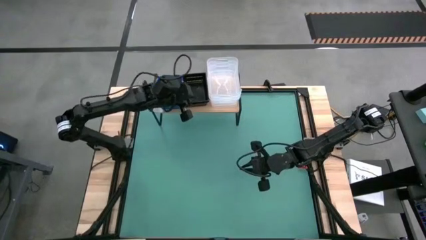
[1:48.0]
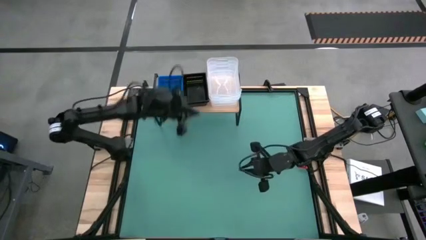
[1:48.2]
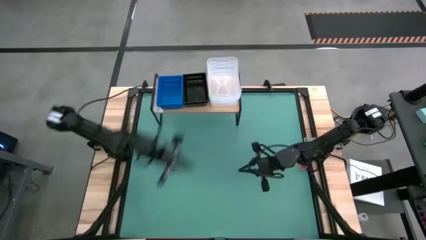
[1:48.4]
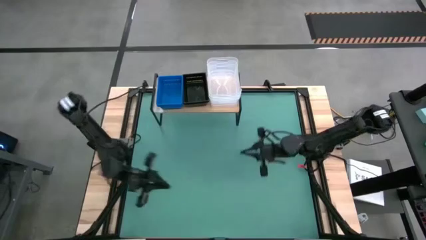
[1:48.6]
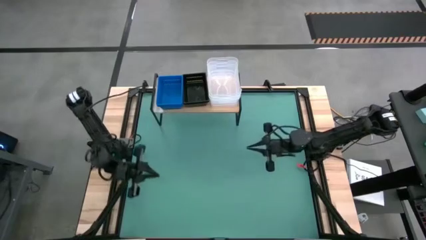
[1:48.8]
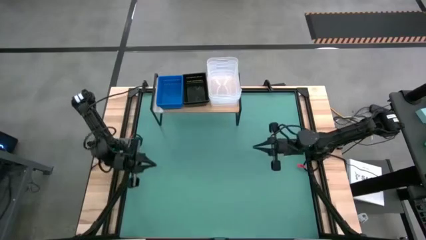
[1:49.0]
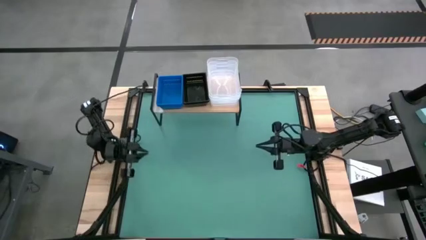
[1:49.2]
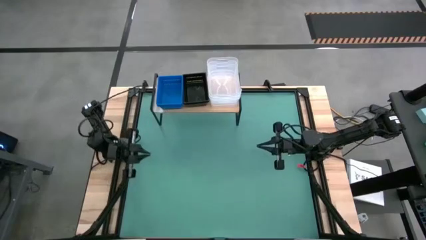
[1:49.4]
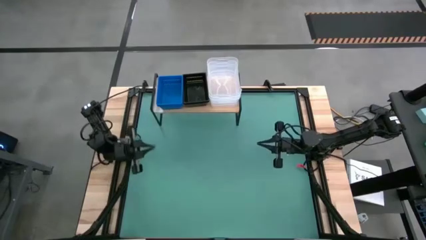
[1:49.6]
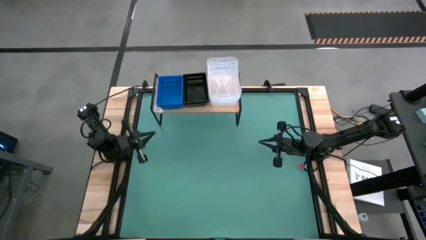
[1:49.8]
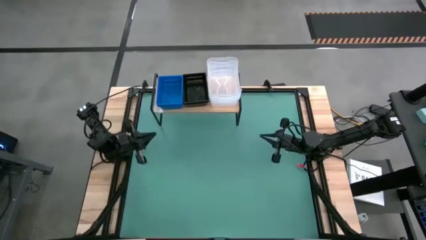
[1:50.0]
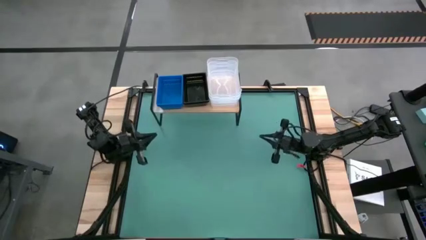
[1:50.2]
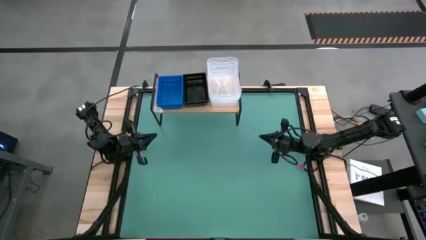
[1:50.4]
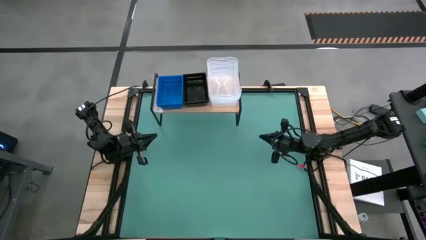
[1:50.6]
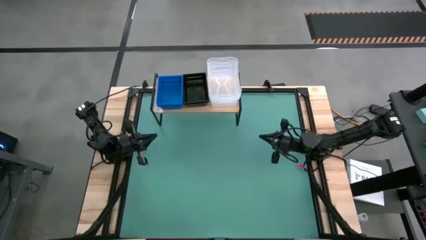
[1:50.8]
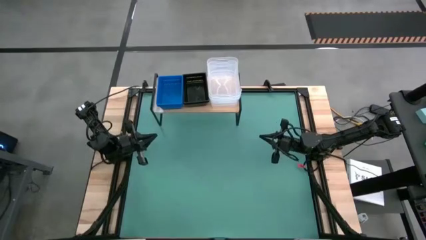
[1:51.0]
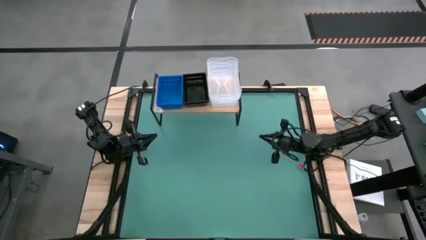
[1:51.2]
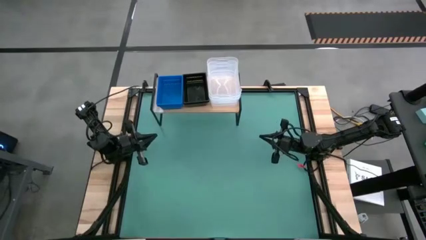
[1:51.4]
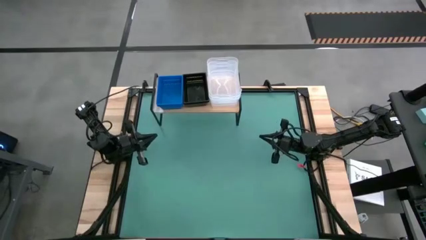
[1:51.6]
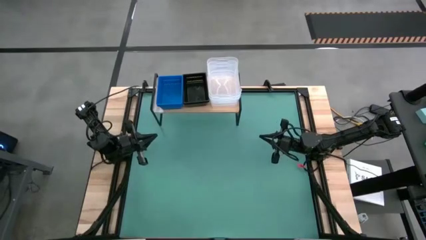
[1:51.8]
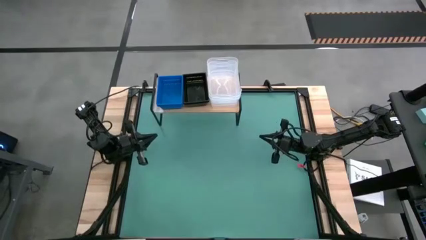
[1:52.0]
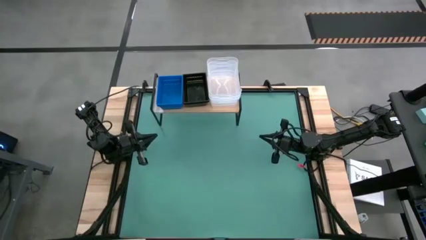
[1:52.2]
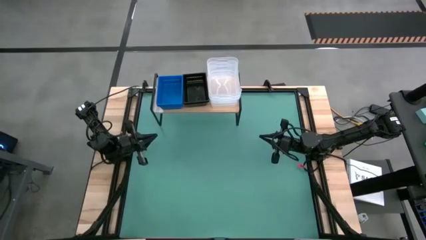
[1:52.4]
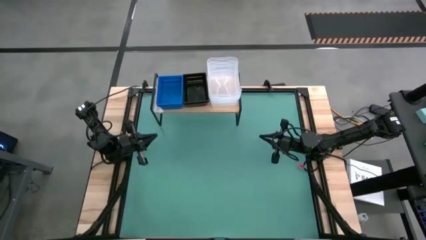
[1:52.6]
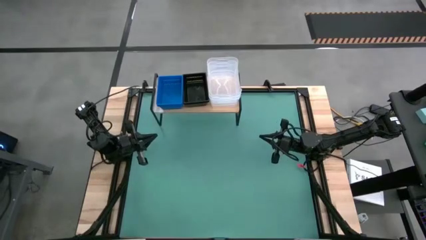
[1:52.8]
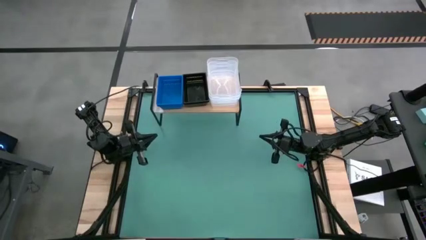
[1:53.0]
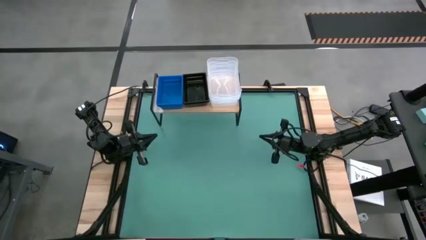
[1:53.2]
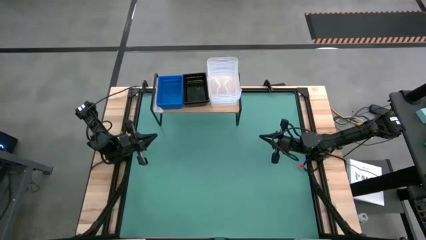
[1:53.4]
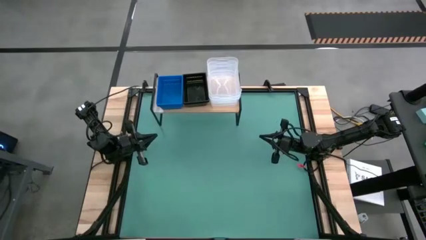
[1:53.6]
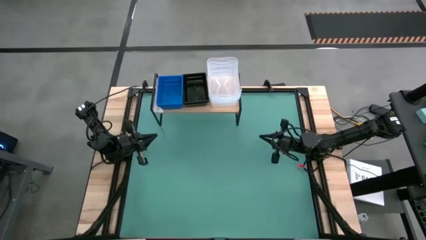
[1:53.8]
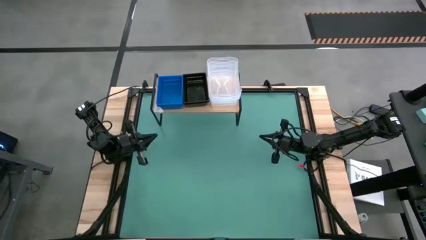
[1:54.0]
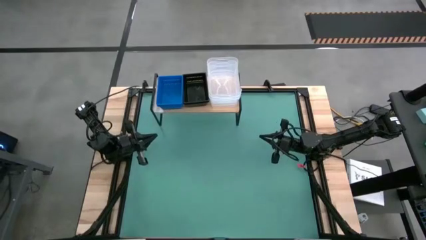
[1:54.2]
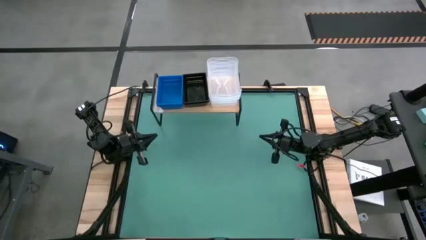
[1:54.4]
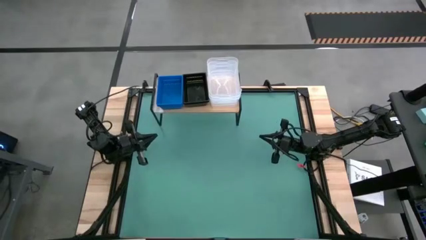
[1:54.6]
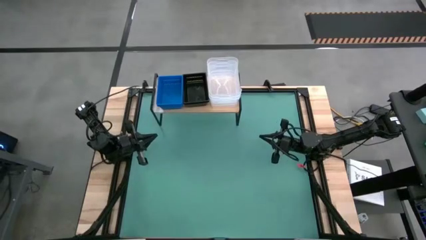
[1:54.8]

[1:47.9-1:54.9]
Task: Stack baskets on shelf by color
Return to Home Position

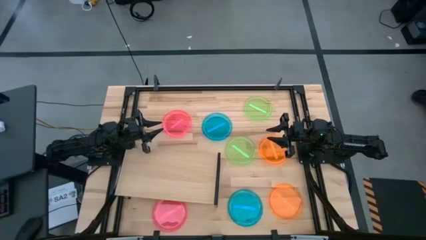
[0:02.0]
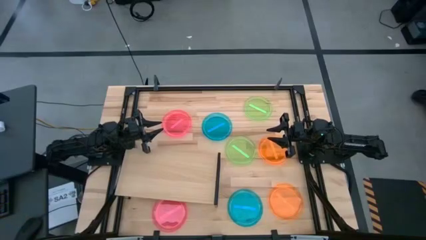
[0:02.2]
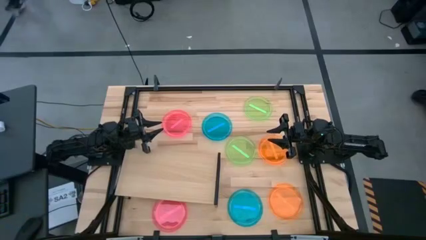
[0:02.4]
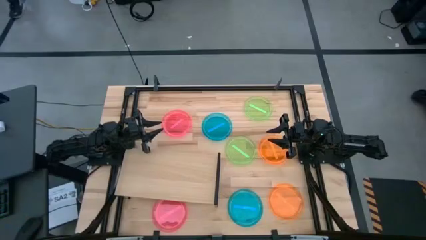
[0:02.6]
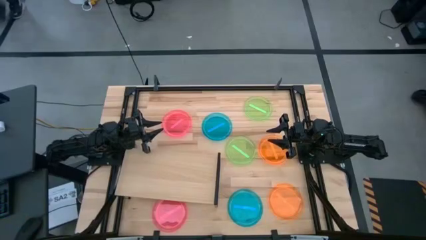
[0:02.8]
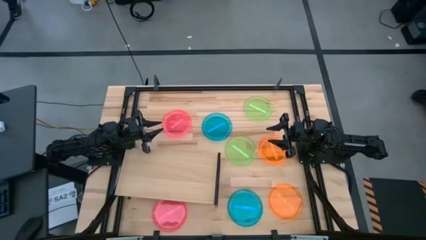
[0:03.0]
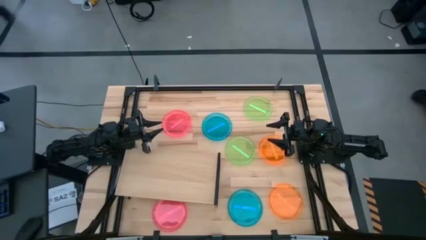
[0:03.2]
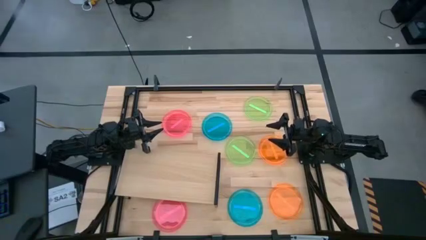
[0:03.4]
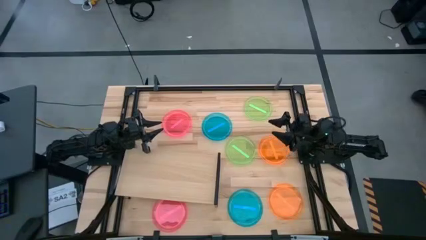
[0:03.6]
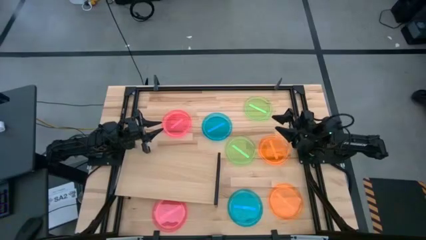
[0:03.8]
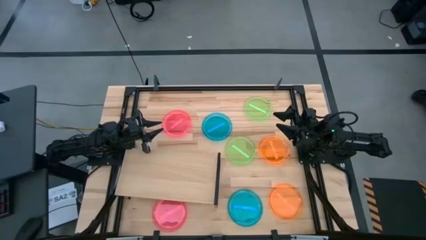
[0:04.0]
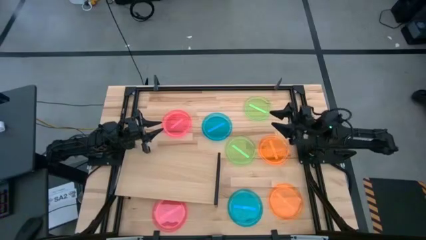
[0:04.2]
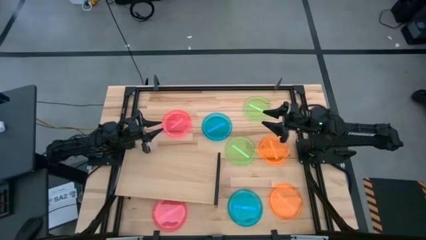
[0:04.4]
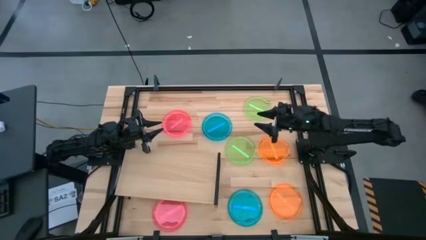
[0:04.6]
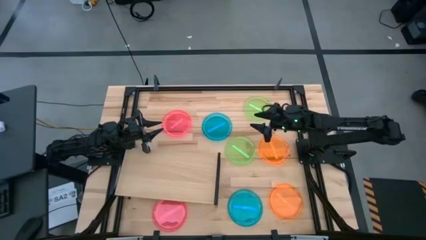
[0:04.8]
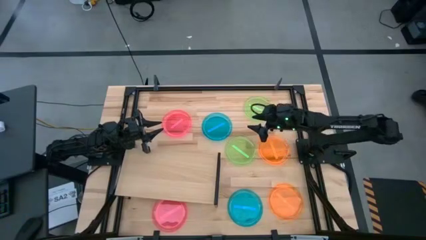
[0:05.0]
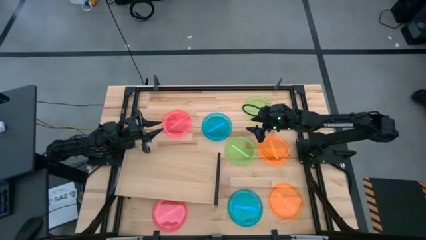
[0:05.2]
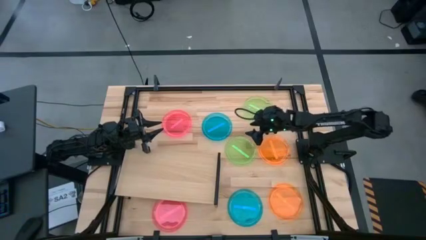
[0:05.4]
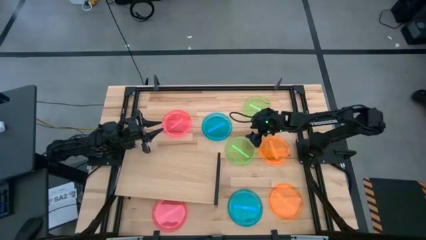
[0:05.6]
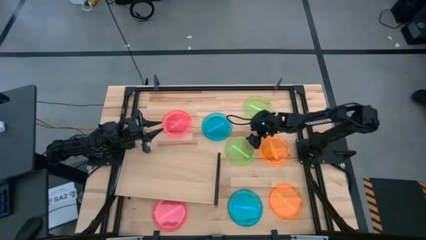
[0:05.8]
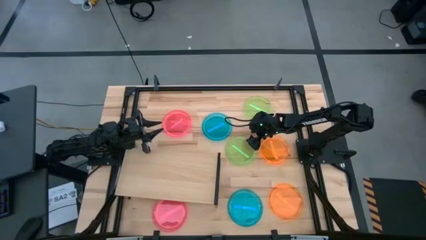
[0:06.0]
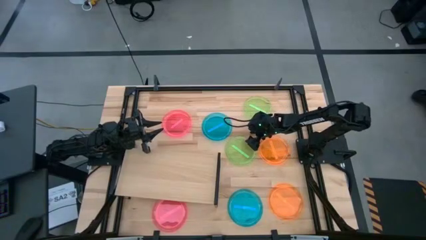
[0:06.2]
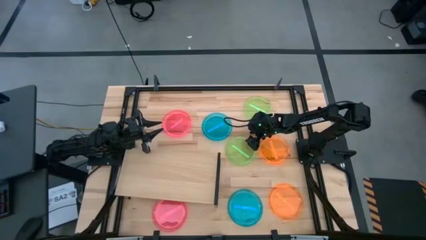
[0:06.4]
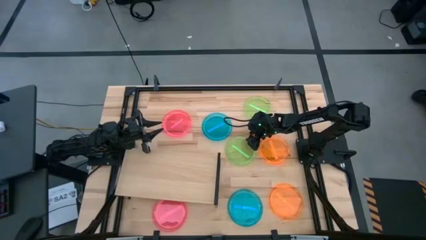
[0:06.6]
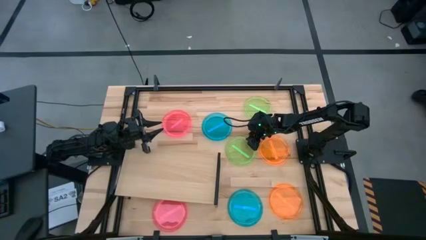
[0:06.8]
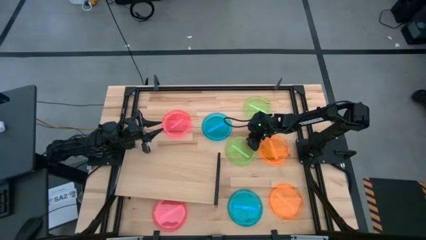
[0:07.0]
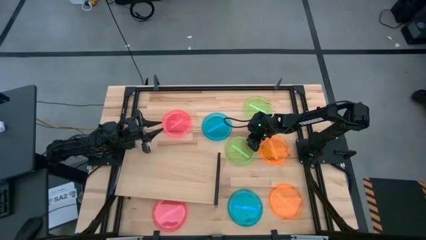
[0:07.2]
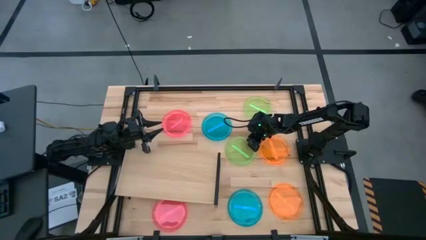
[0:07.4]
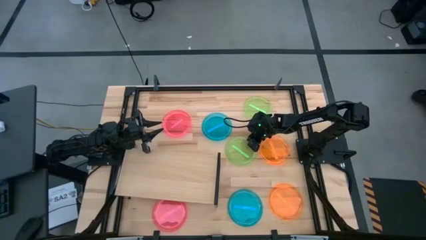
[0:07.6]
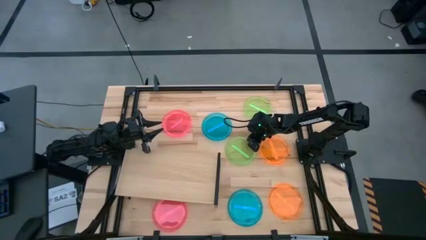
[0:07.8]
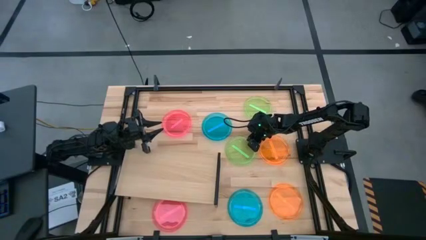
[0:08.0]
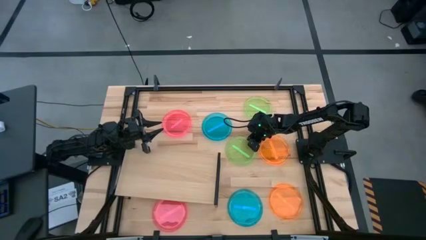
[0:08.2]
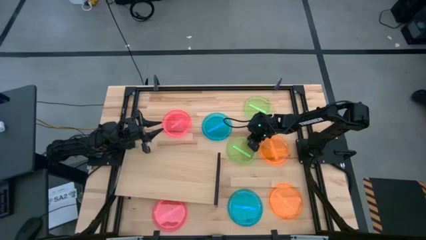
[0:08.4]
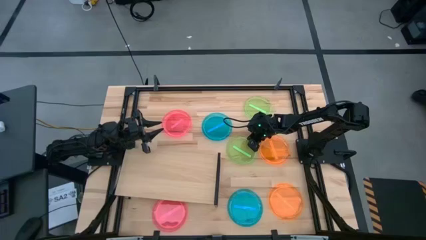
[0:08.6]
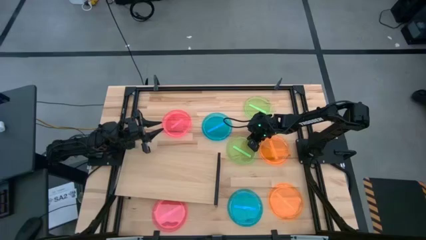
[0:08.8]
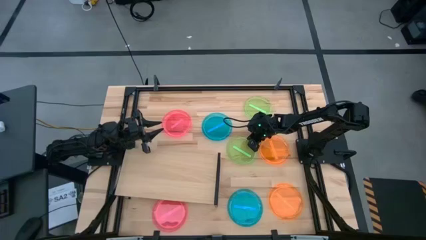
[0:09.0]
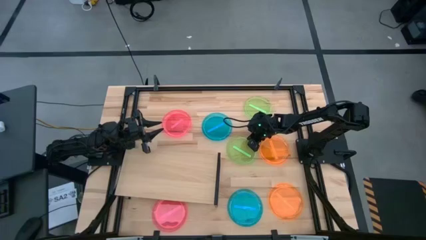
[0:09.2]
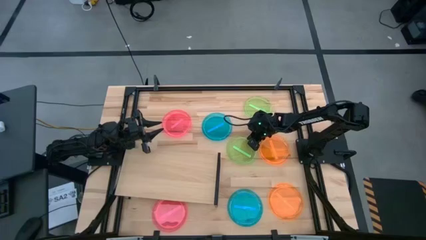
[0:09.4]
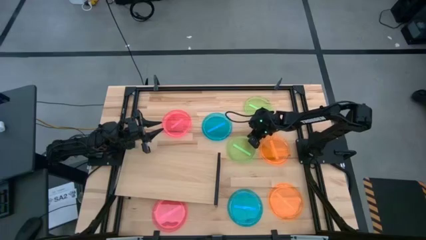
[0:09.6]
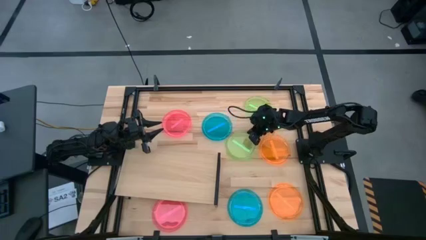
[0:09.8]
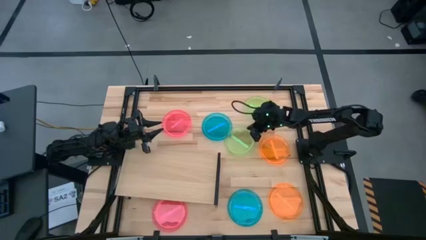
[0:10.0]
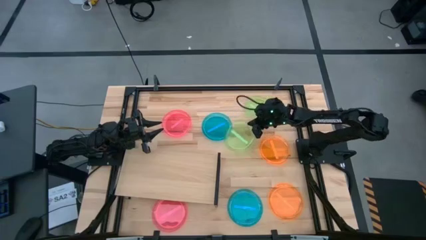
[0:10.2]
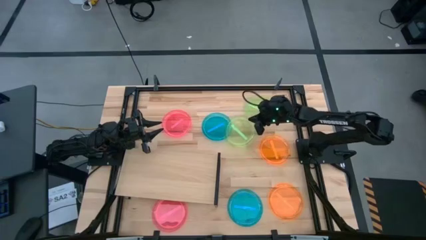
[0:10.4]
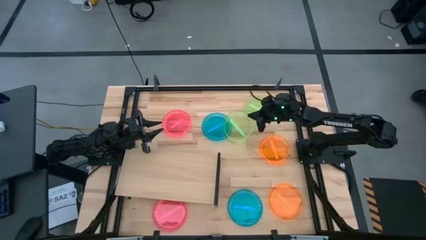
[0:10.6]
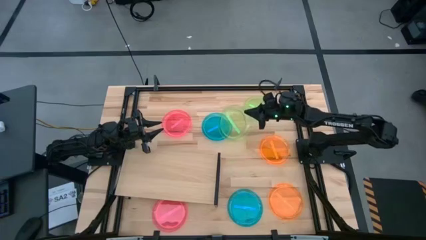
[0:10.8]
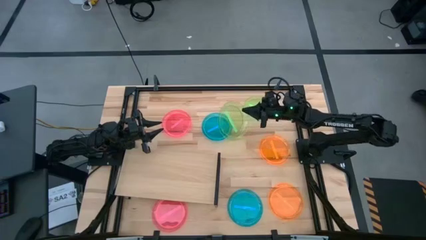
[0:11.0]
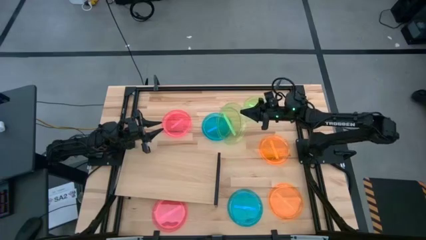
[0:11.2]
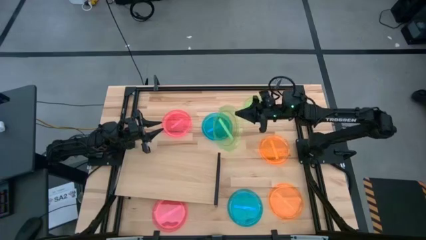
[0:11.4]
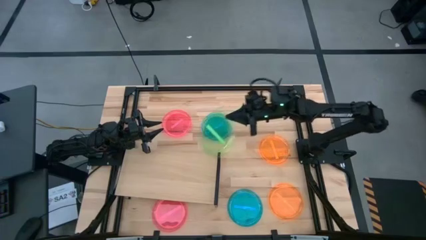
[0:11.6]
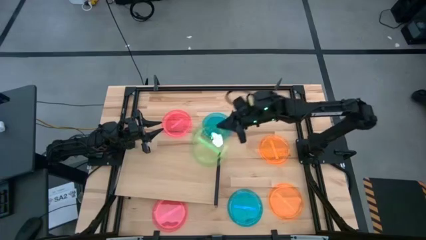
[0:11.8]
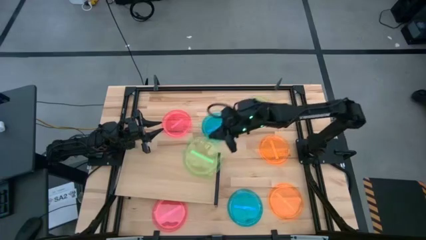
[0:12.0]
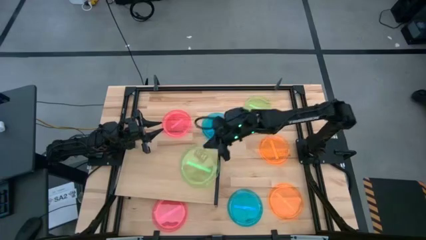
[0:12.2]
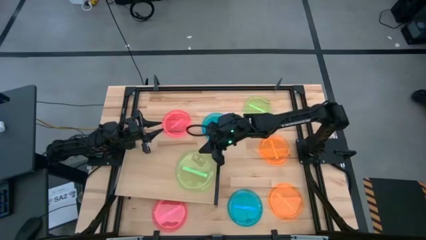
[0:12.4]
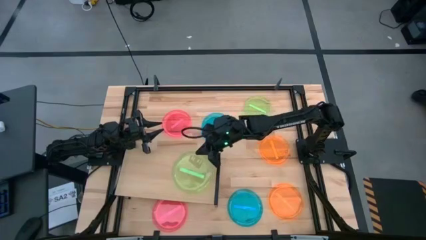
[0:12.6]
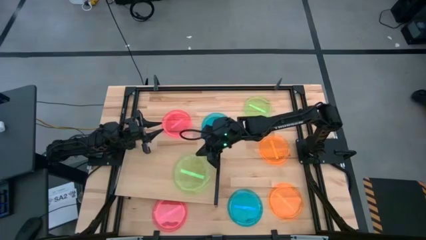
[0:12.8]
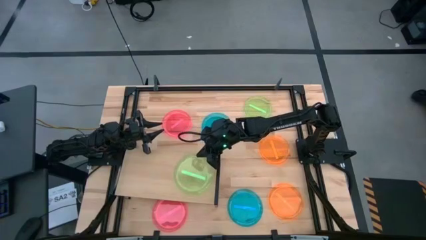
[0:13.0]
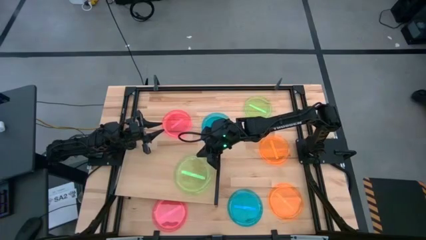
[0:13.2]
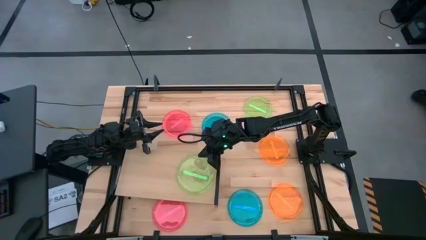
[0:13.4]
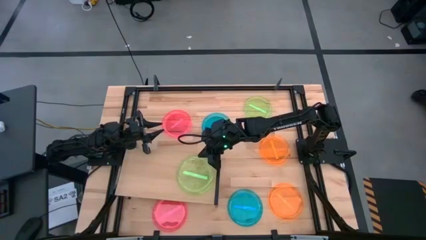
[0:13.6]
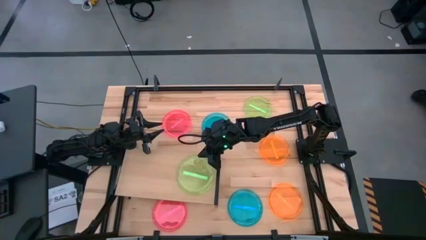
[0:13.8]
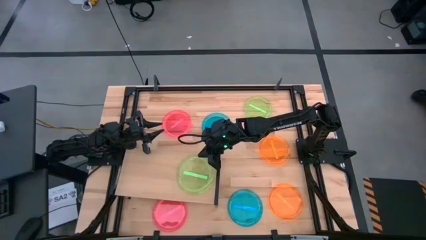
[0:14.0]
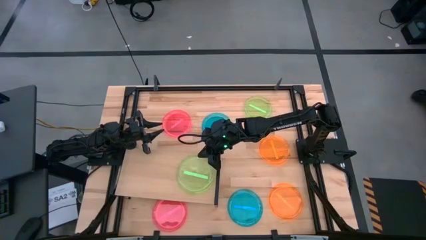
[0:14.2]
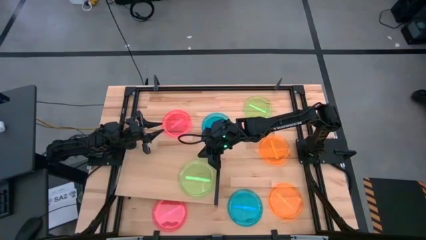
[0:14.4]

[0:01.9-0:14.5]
Task: Place and stack plates onto a shelf
Put the bottom green plate on the shelf
